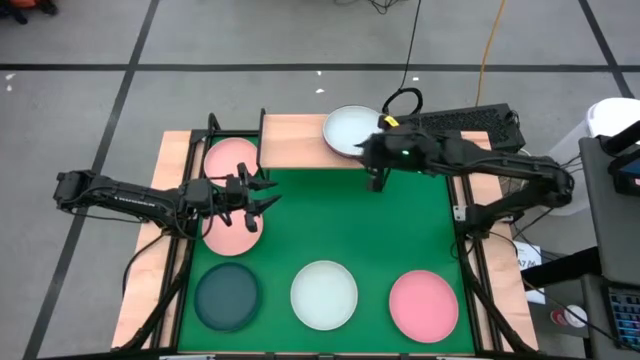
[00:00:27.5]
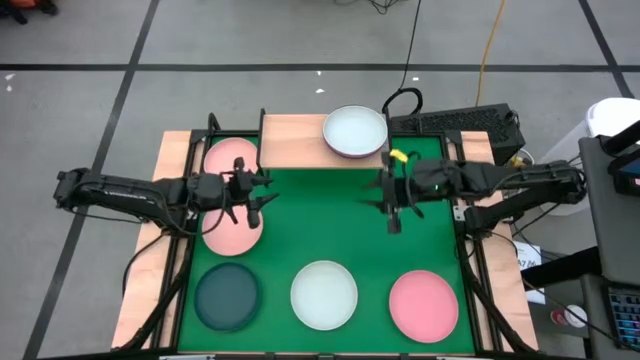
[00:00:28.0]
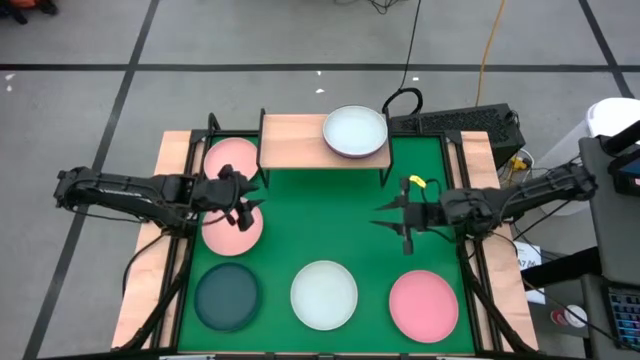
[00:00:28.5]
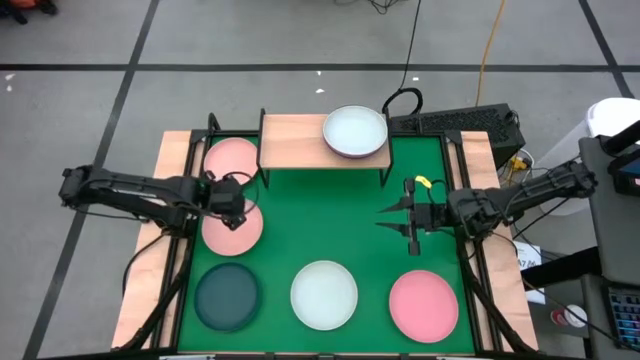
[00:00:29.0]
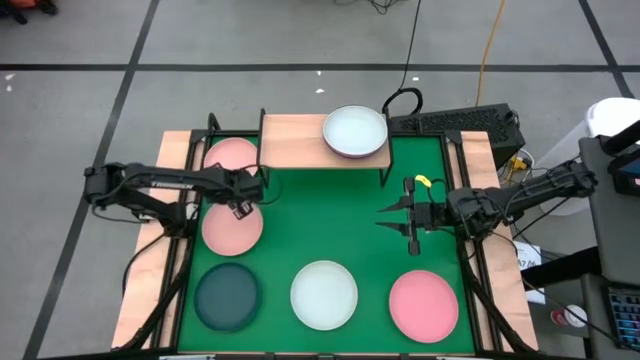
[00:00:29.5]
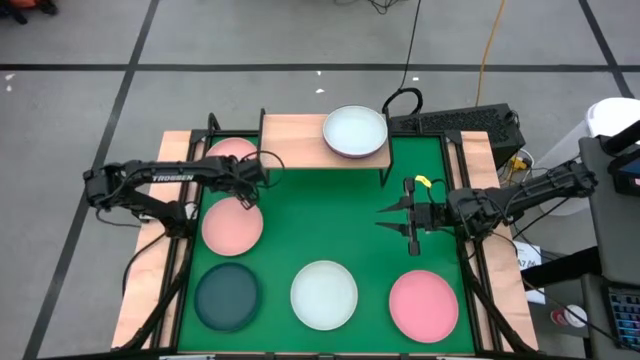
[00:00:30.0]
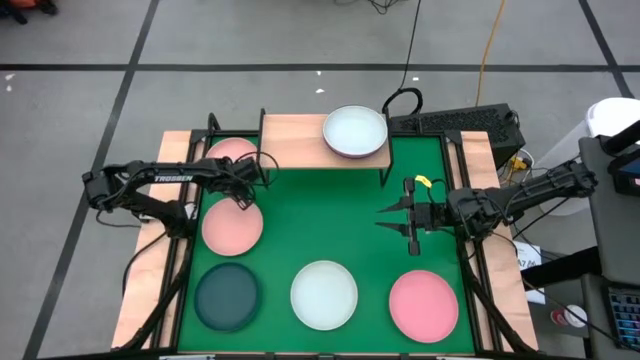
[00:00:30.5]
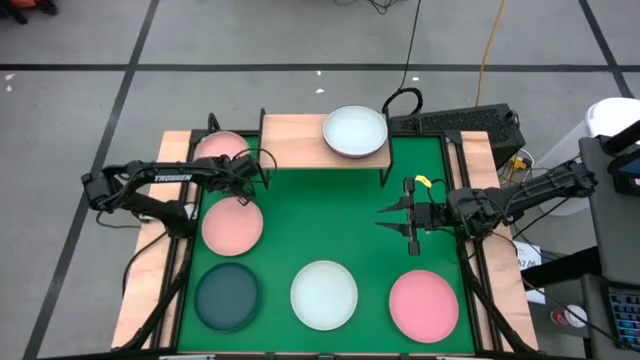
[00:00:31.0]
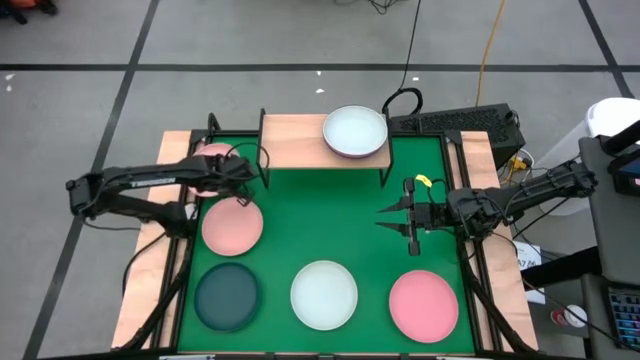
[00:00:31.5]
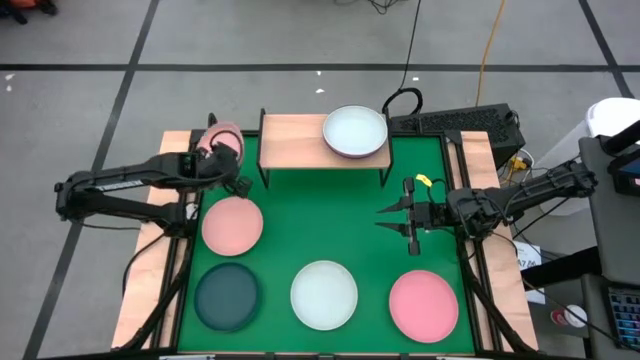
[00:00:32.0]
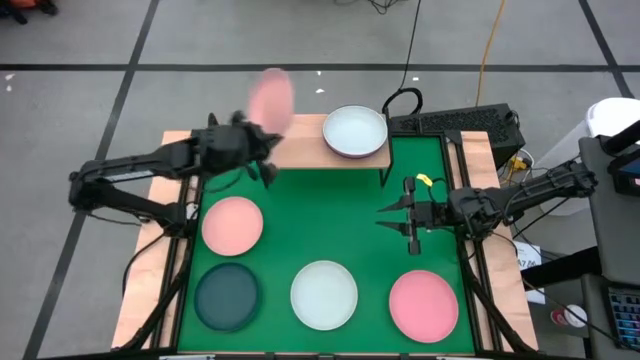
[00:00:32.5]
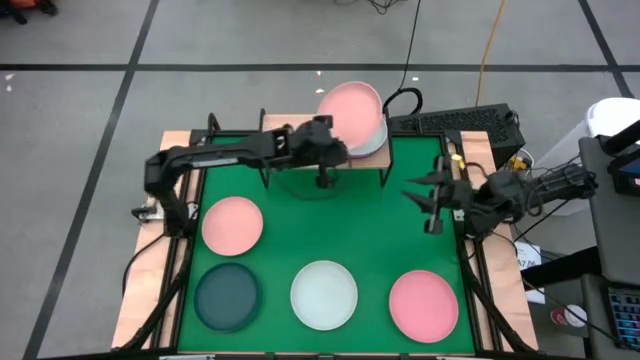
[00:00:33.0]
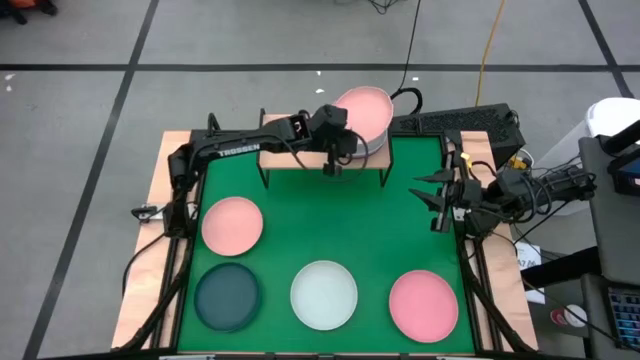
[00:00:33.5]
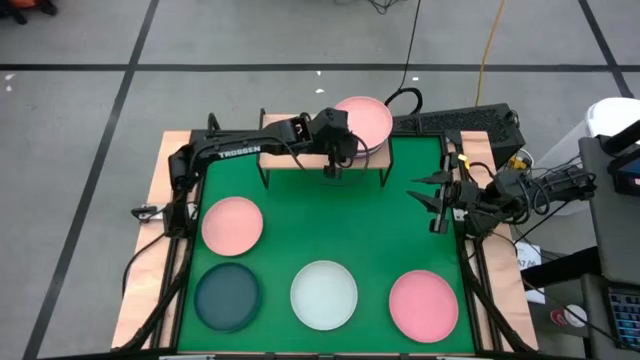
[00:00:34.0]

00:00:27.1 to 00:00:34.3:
Task: Place and stack plates onto a shelf
Stack the top light orange plate on top of white plate on the shelf

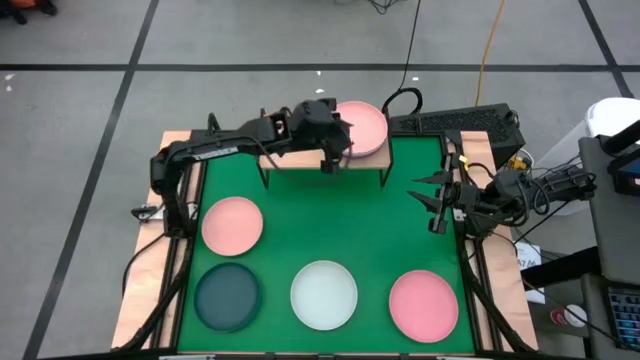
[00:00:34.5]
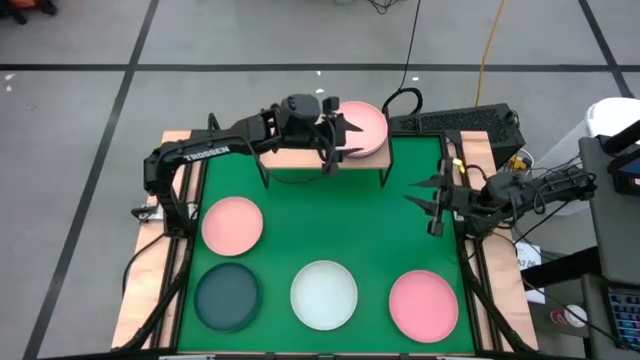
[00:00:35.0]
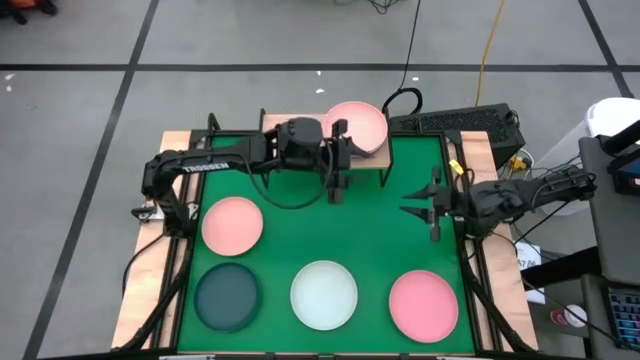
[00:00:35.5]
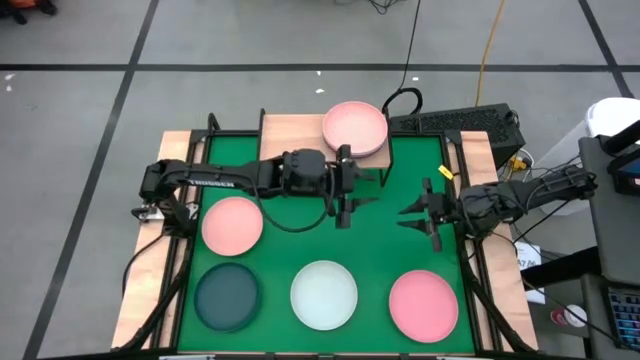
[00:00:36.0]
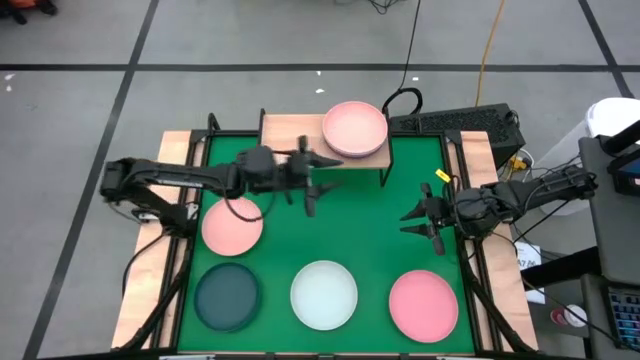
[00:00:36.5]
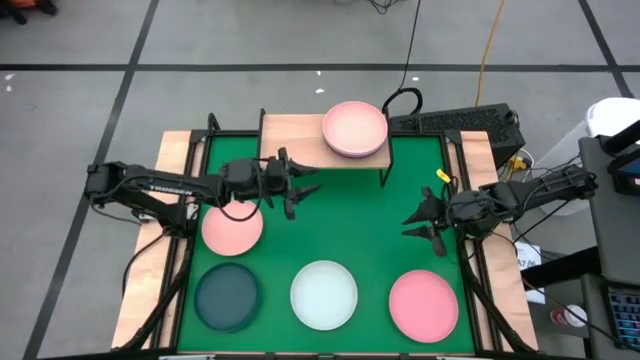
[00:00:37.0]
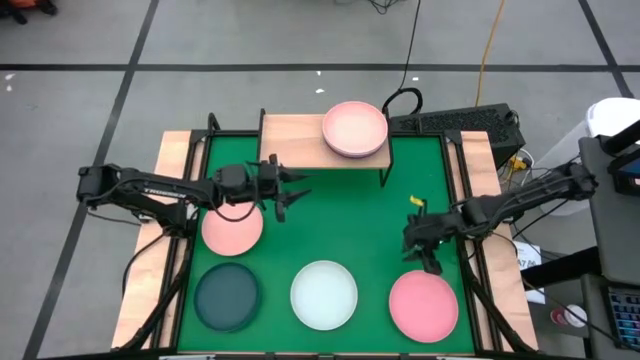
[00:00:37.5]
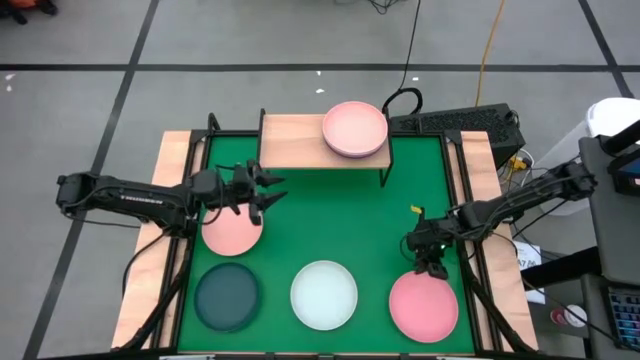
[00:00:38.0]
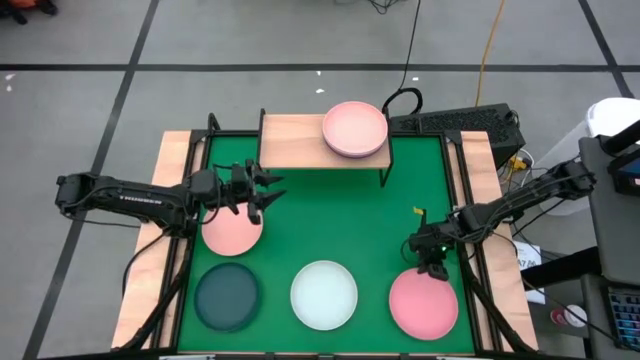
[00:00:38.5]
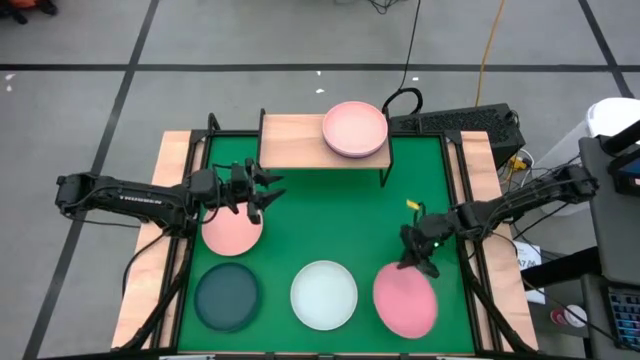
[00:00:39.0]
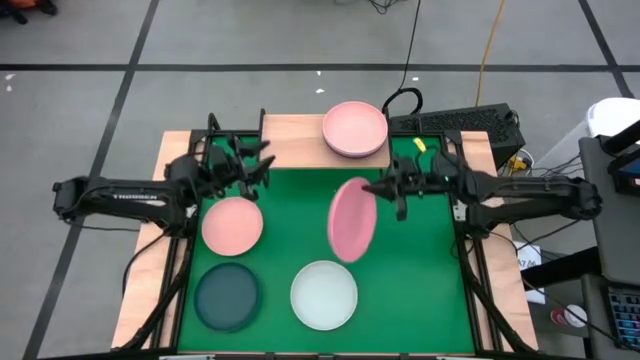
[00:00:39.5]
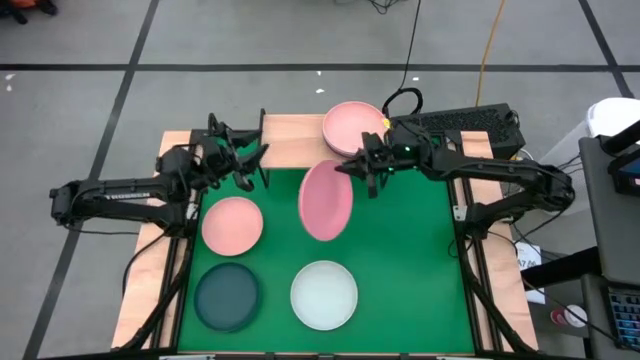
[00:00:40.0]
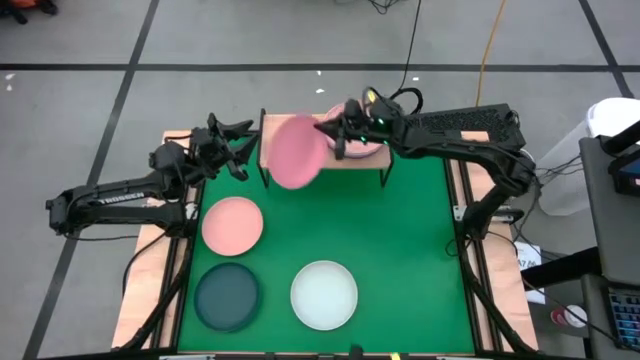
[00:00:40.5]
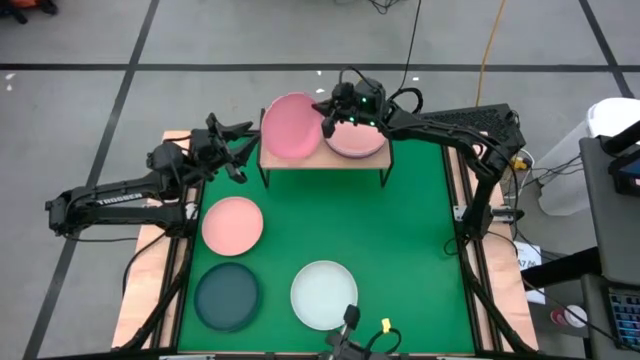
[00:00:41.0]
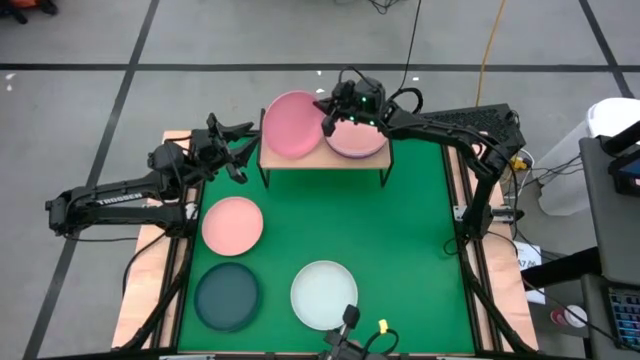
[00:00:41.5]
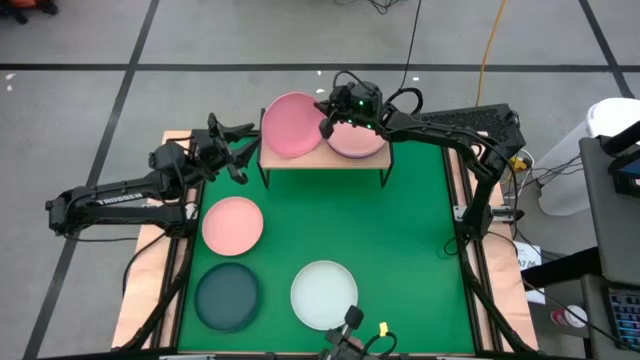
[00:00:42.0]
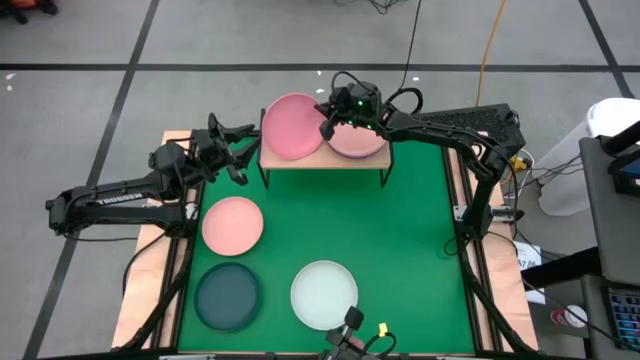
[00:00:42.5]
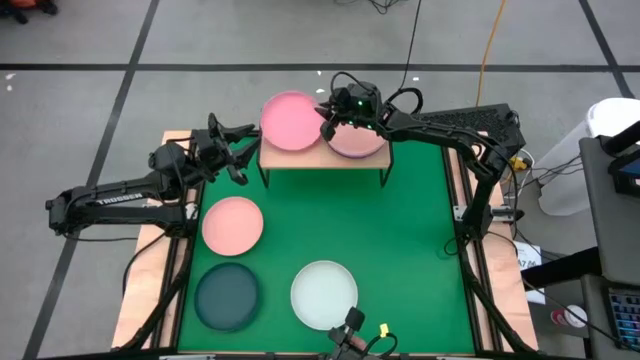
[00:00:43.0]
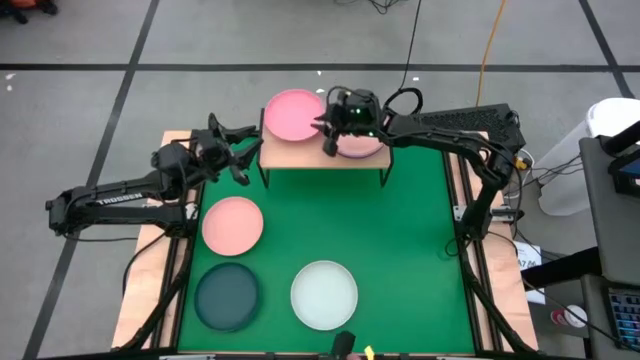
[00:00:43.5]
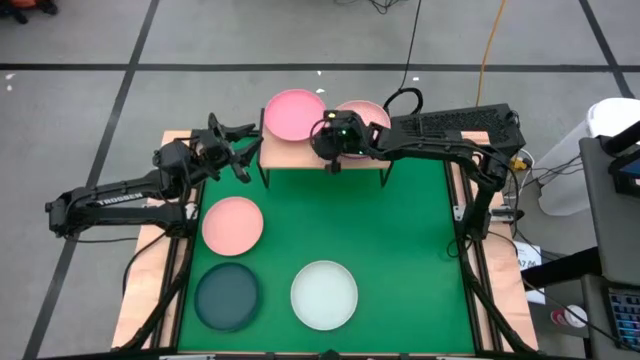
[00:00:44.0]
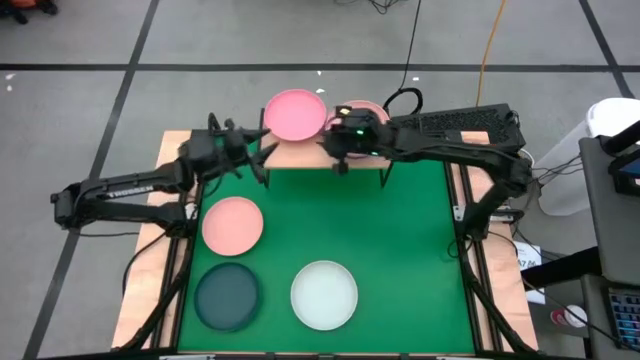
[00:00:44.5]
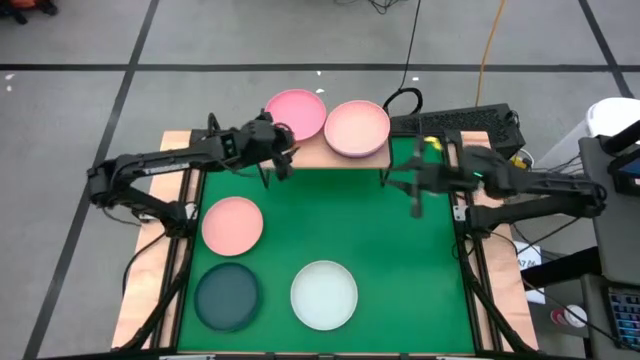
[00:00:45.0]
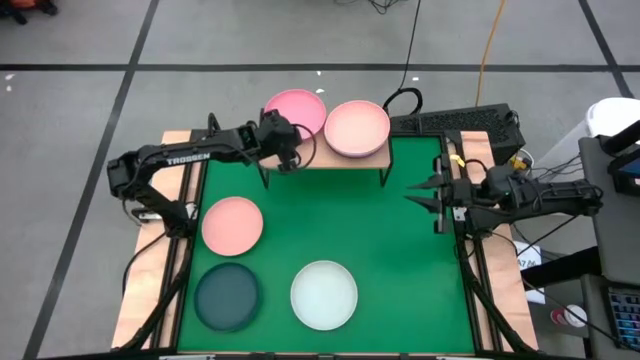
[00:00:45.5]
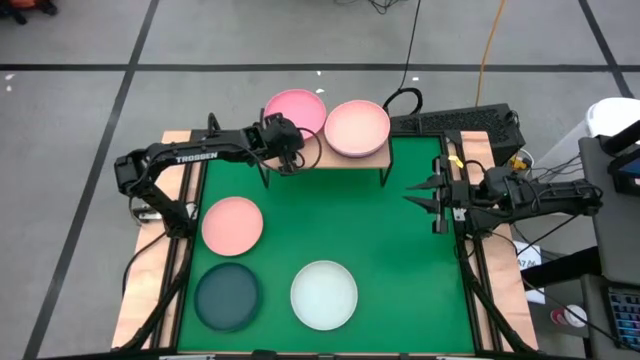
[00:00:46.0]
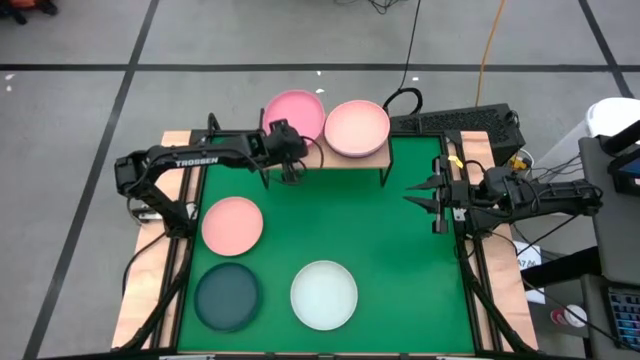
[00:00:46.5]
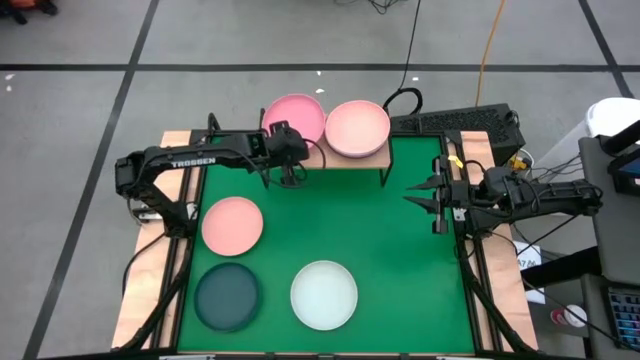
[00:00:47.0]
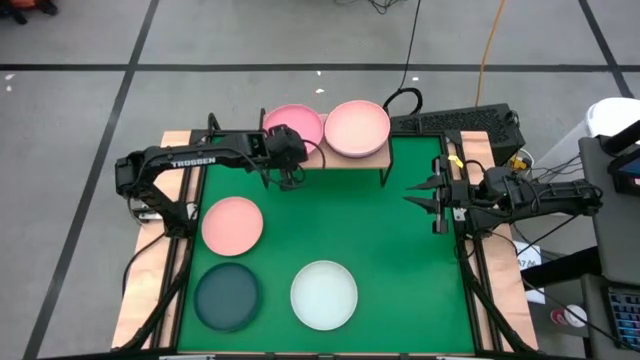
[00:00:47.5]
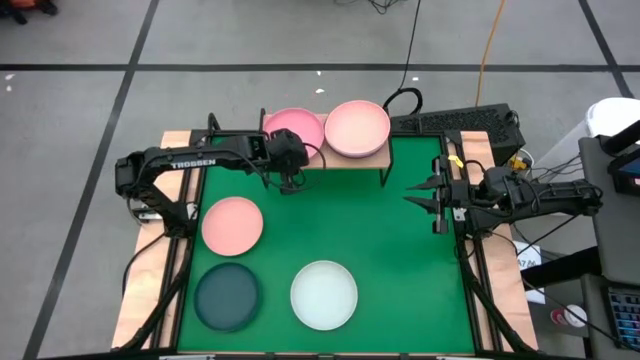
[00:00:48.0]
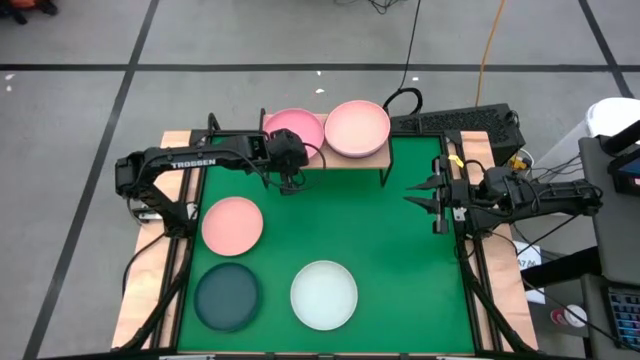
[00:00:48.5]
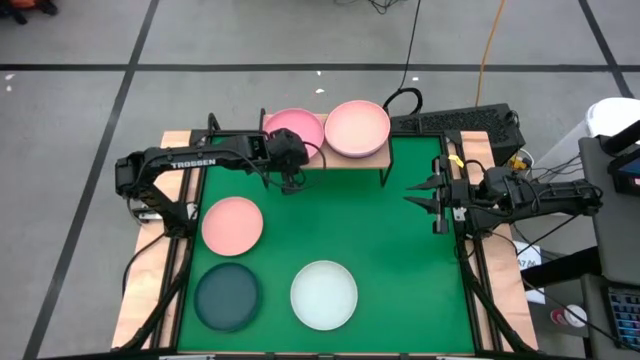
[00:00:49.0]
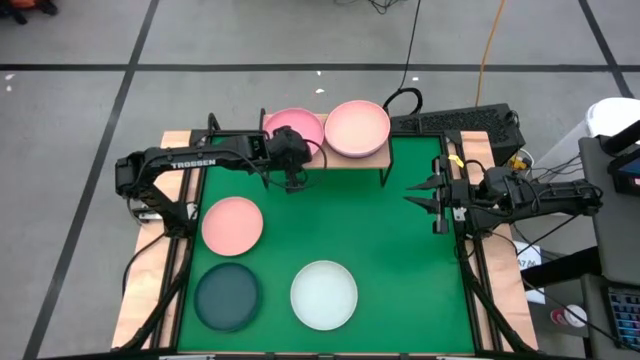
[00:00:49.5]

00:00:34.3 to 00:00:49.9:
Put the light pink plate on the shelf
